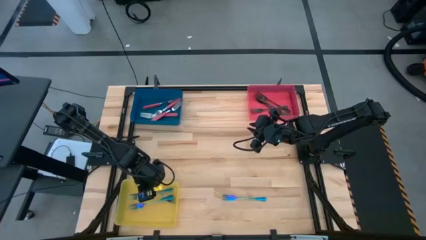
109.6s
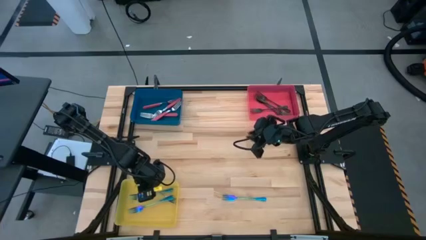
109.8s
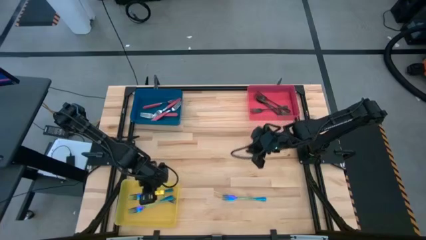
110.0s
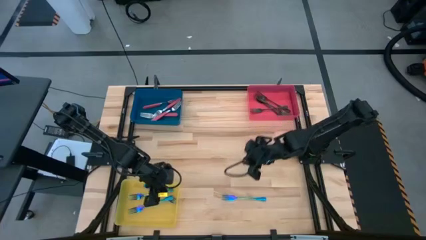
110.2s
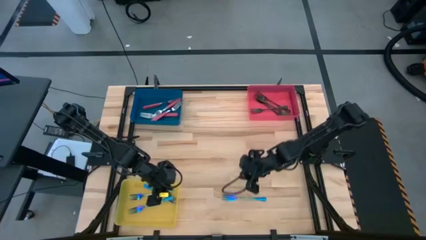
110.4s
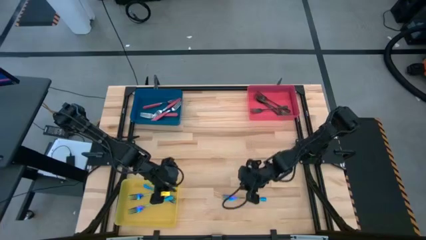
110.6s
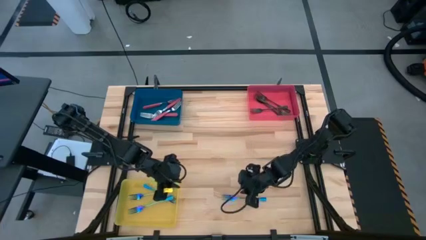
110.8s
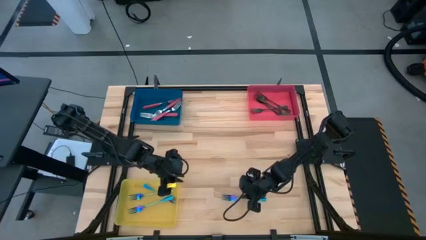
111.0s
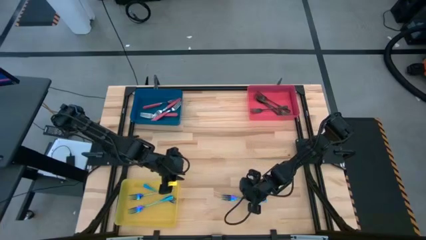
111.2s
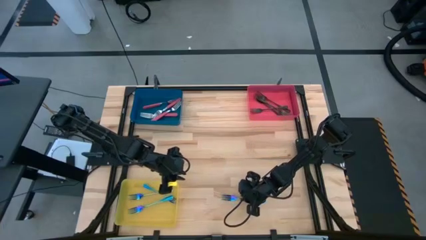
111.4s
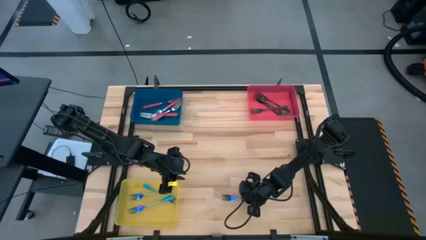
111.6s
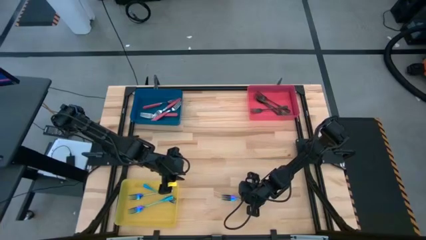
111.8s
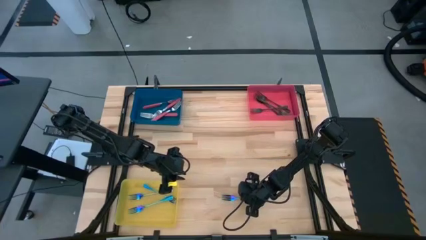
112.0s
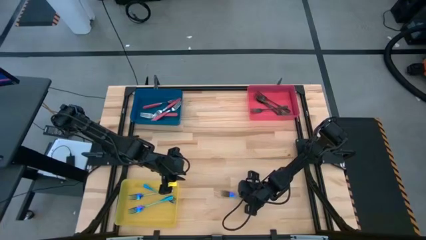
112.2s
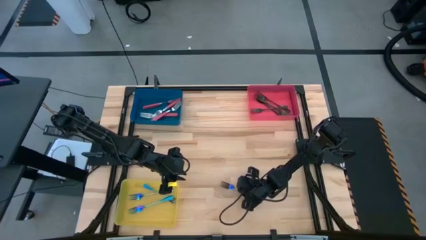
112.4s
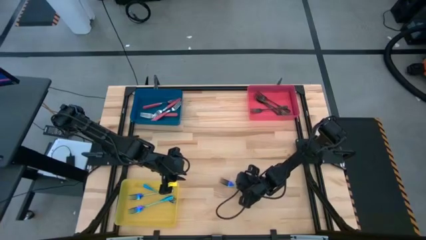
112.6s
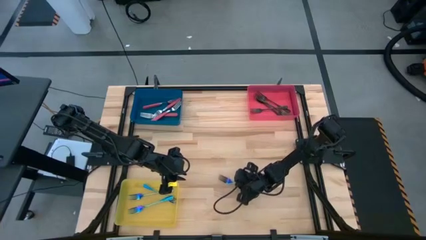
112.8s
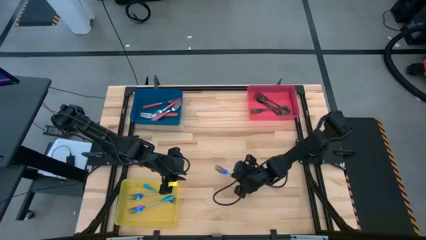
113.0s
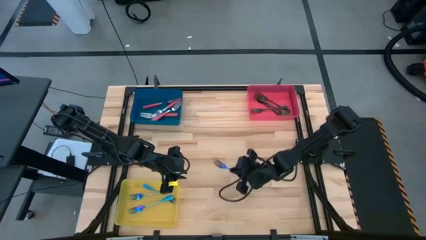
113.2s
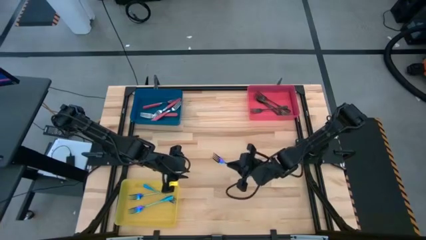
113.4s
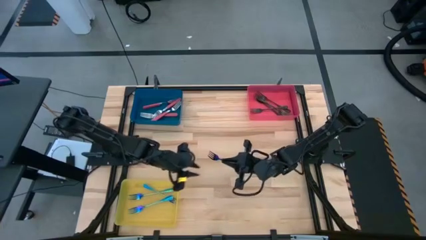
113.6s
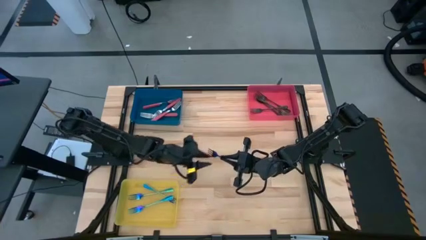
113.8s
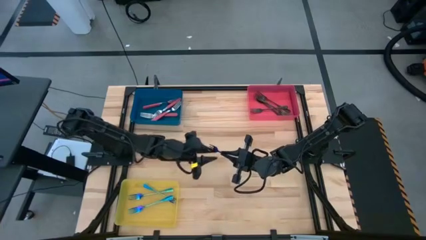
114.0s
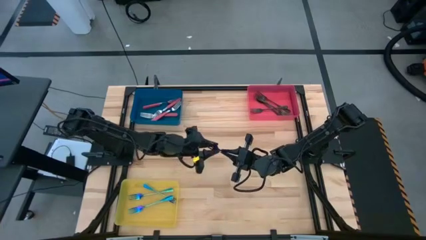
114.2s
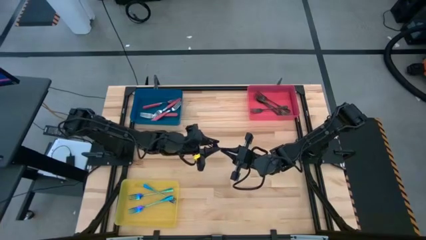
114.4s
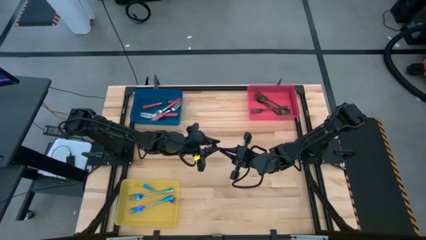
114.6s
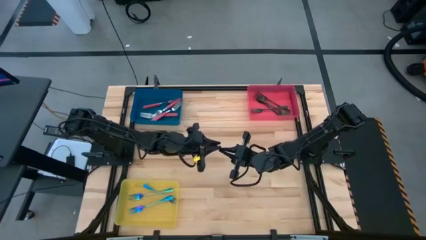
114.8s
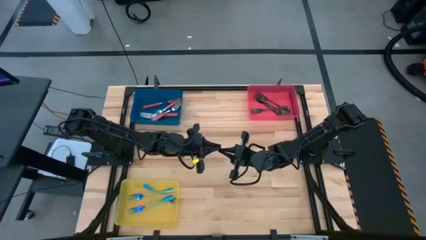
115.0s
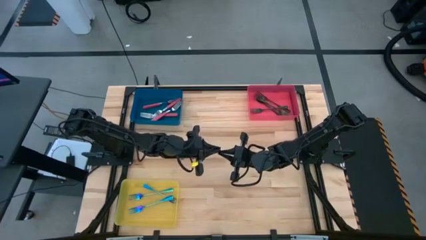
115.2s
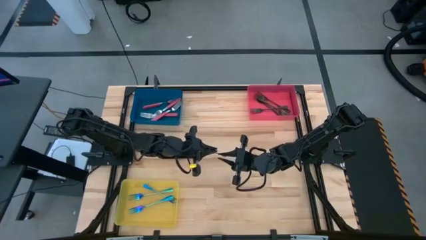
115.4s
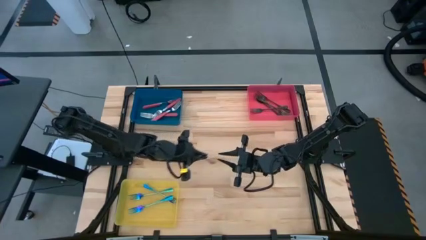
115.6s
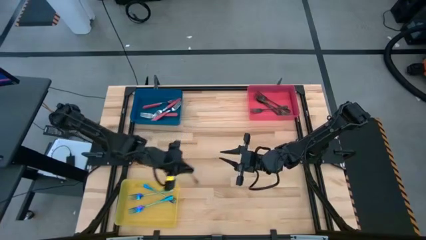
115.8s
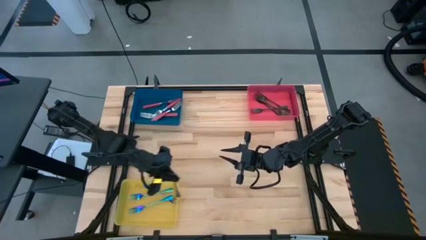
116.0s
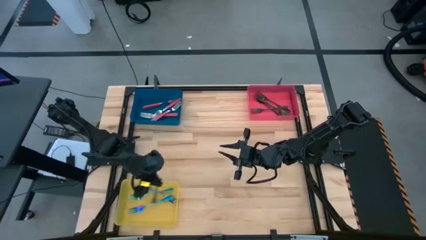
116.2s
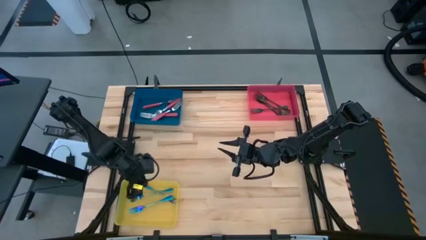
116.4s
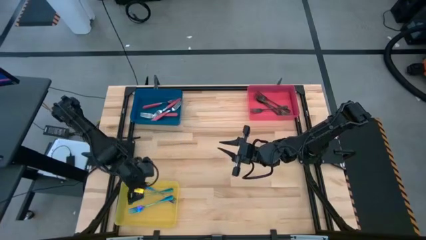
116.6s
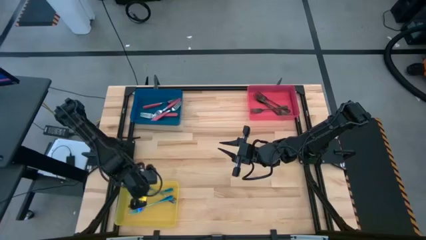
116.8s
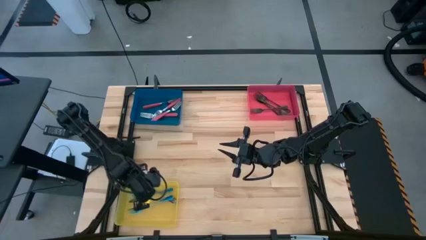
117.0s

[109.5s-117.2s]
Task: Sort silverware by color (type)
Put the blue fork into the yellow bin

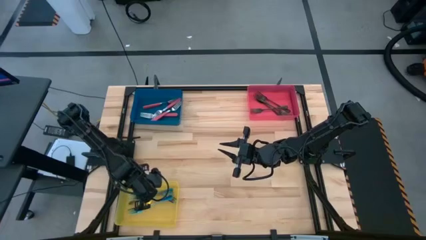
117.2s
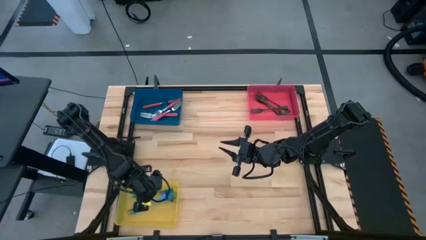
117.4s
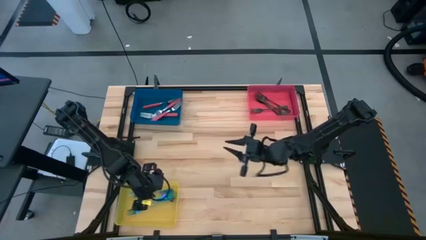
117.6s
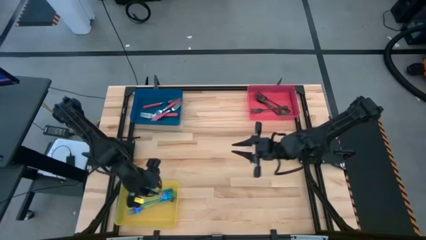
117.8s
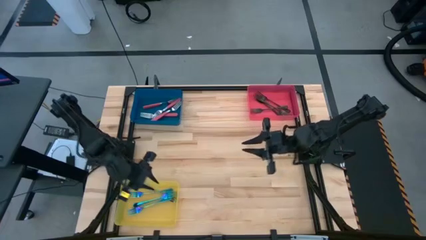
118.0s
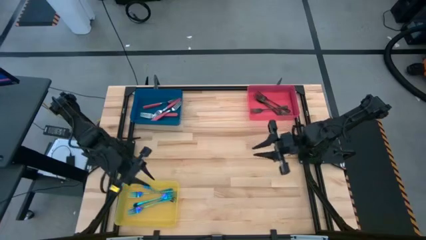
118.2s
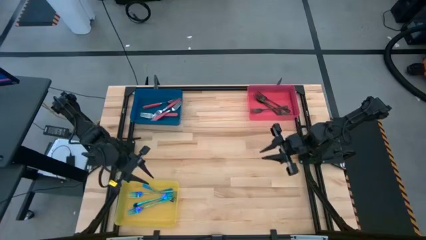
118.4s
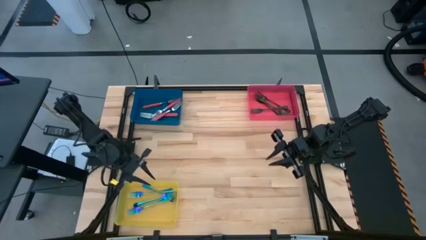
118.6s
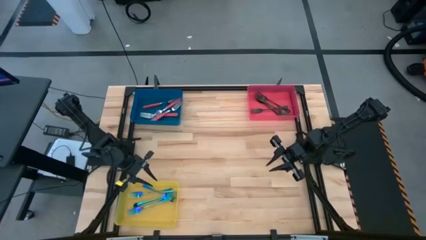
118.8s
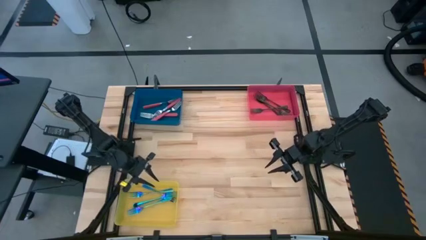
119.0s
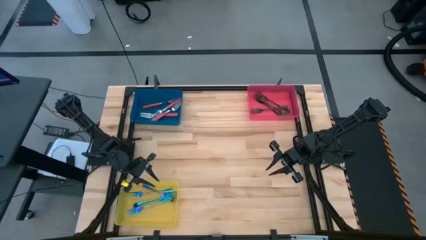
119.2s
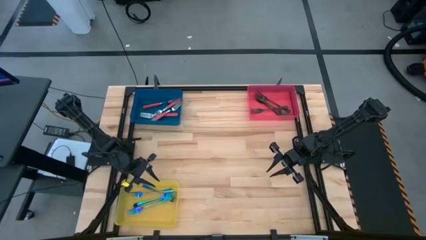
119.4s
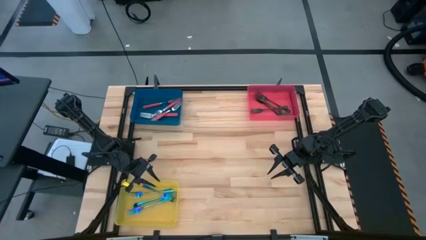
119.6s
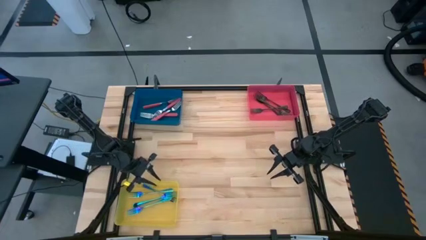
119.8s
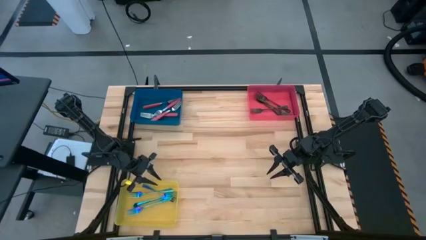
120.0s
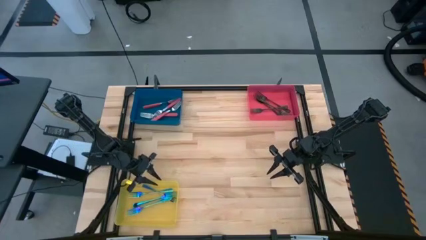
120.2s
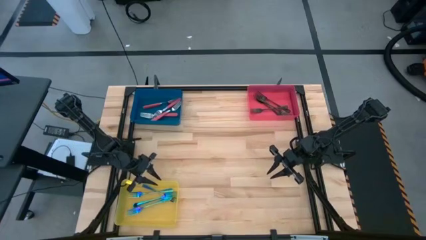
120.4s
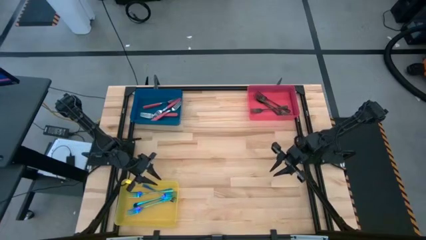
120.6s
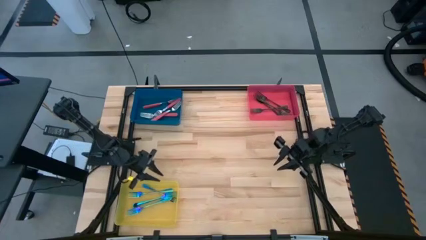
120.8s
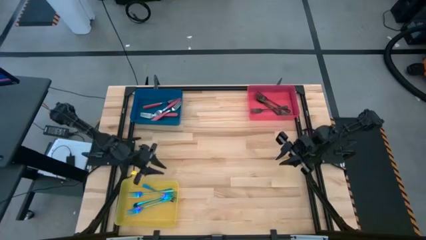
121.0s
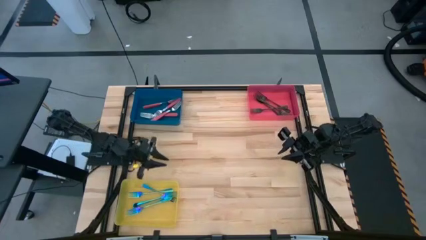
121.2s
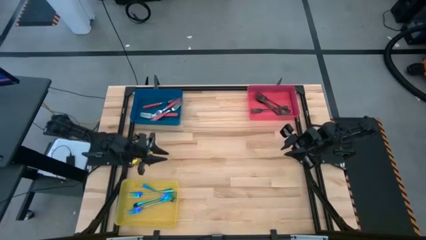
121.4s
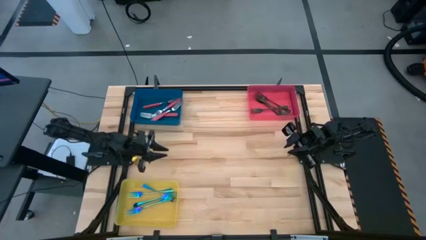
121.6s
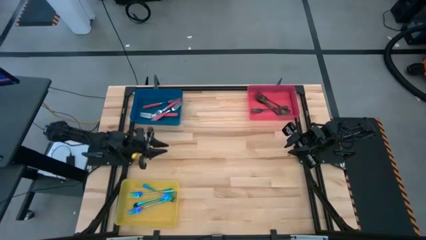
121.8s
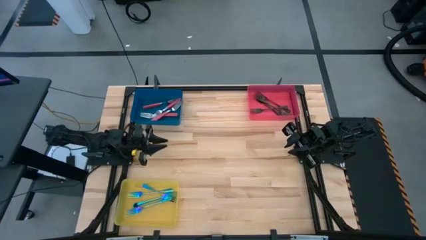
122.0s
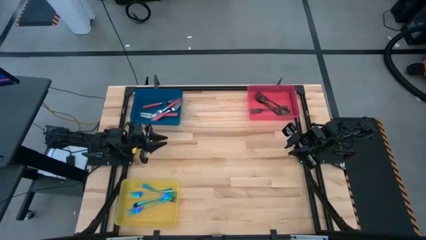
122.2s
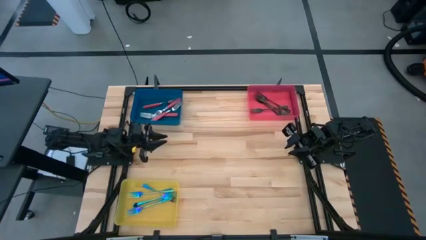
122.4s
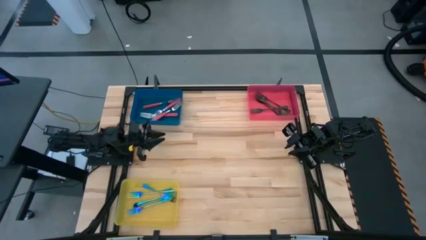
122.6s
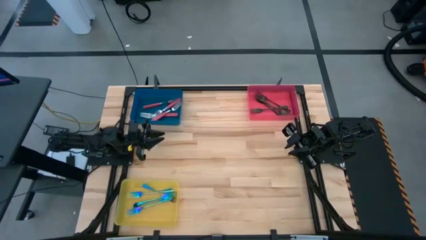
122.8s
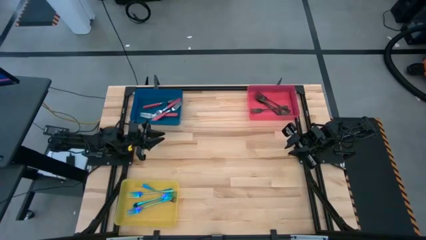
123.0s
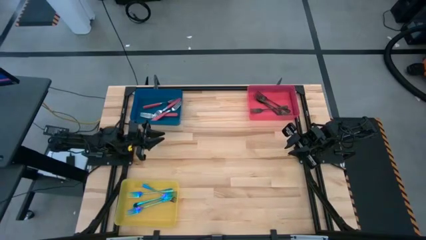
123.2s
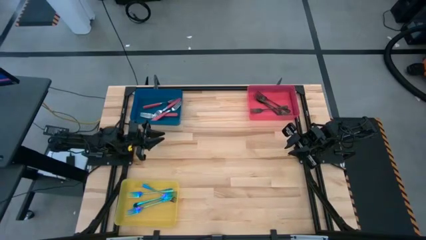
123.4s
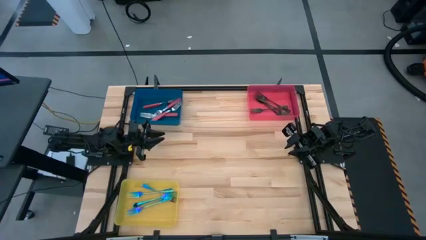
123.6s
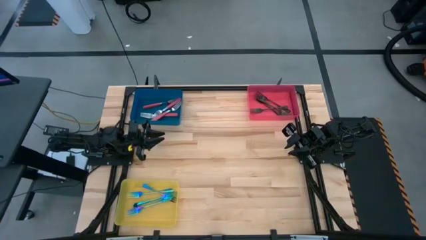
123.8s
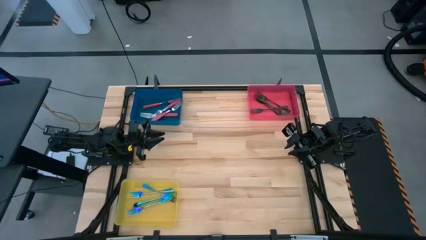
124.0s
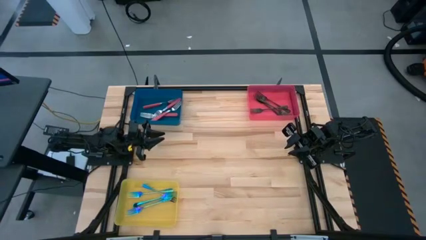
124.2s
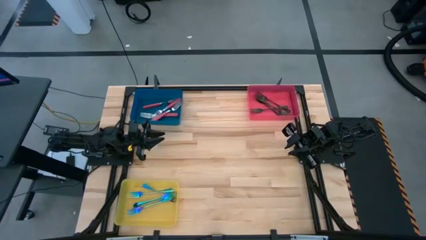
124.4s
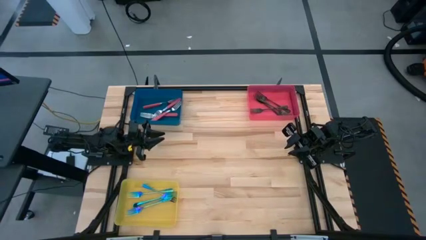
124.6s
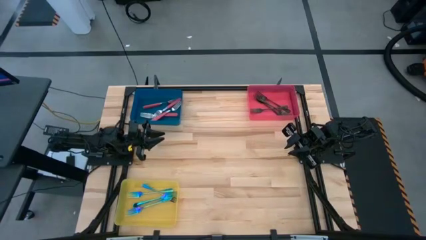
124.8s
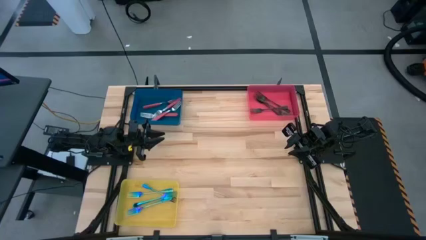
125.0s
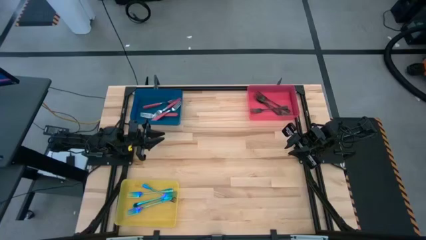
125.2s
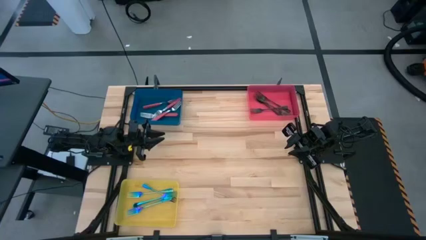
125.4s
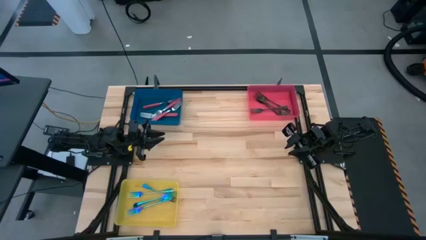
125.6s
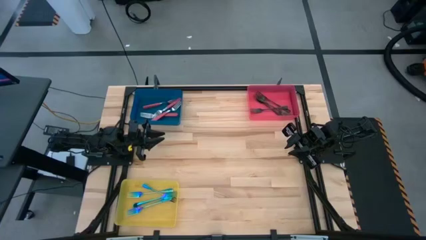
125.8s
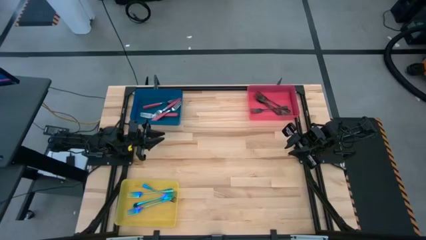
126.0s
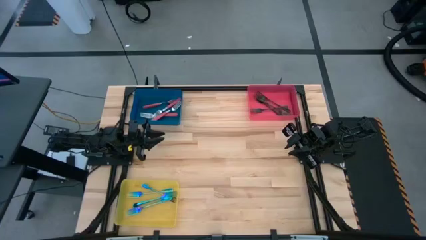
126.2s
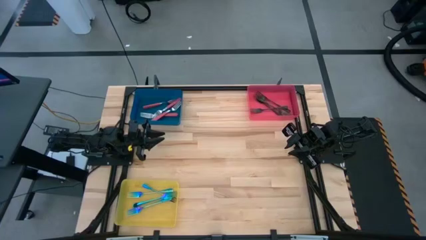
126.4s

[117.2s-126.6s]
Return to Home Position
